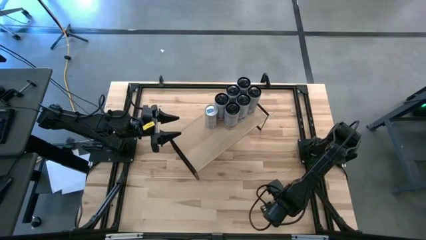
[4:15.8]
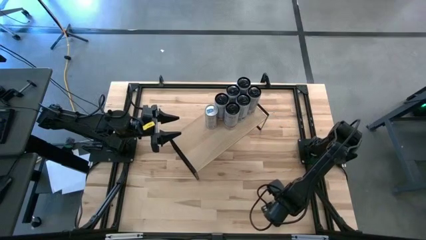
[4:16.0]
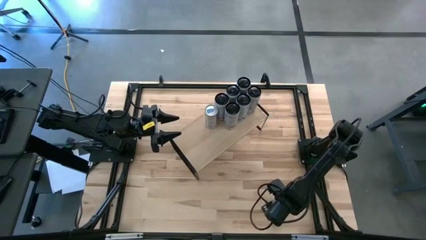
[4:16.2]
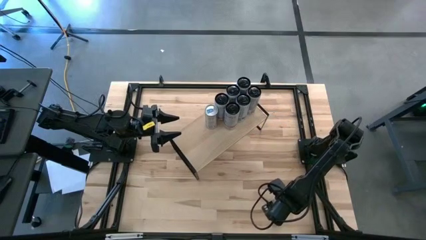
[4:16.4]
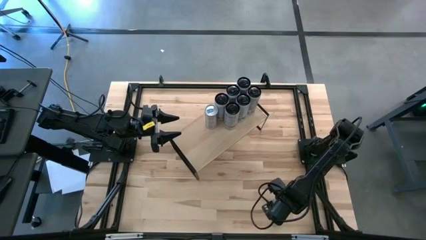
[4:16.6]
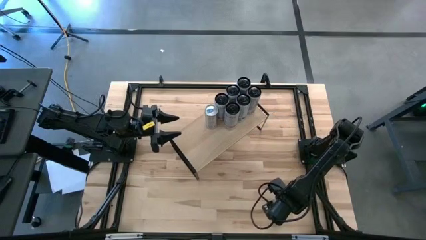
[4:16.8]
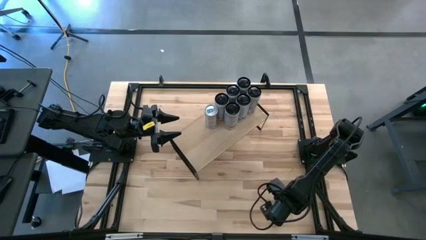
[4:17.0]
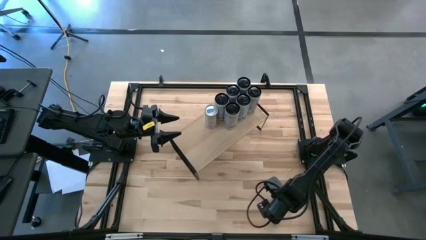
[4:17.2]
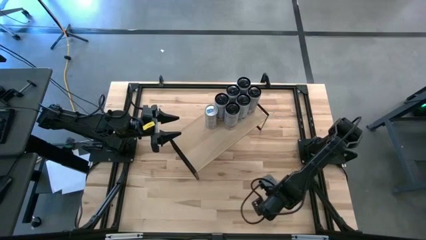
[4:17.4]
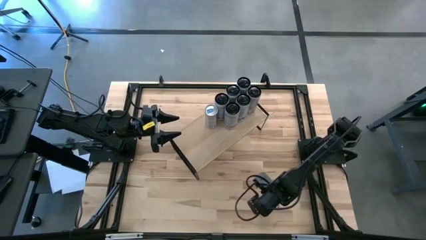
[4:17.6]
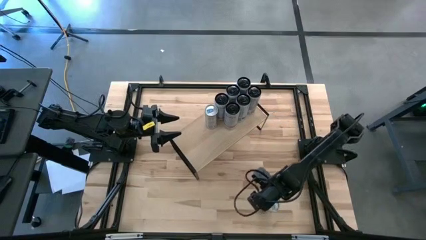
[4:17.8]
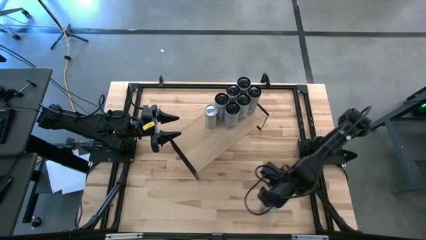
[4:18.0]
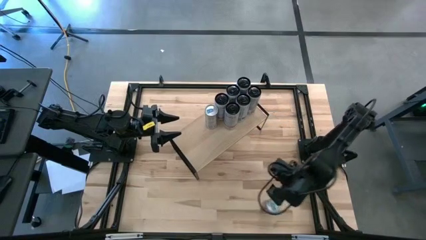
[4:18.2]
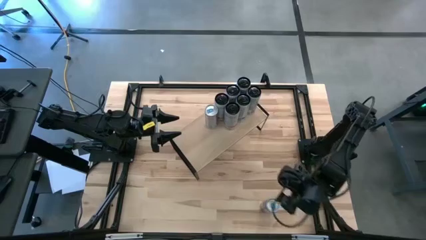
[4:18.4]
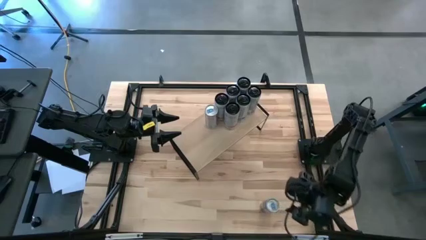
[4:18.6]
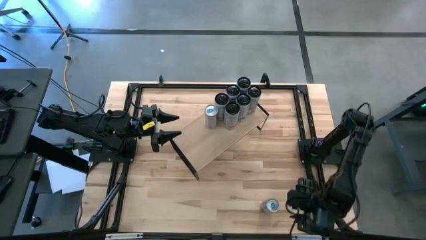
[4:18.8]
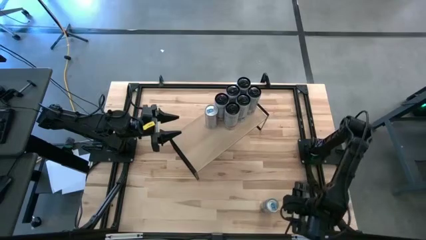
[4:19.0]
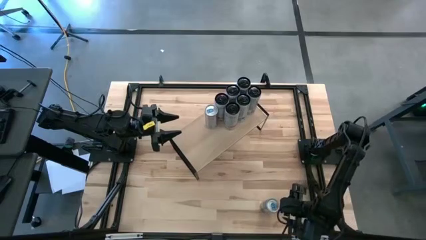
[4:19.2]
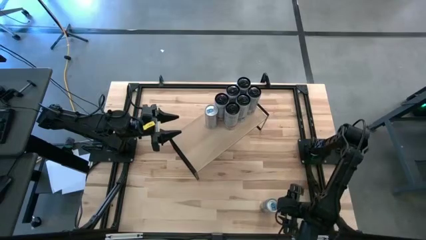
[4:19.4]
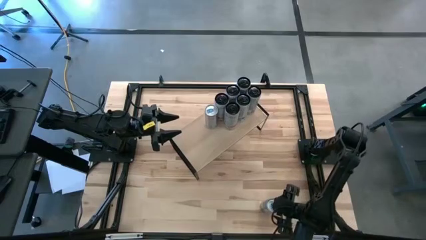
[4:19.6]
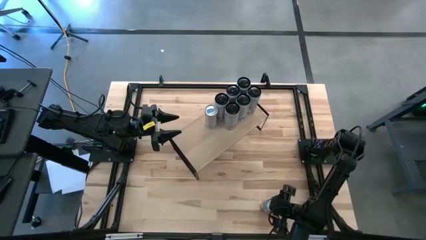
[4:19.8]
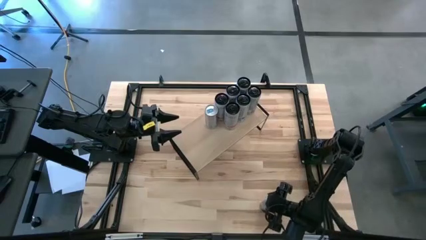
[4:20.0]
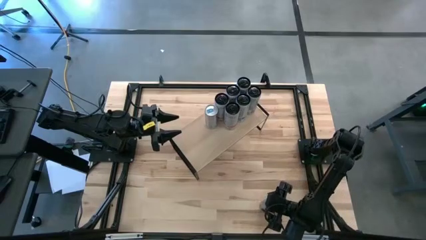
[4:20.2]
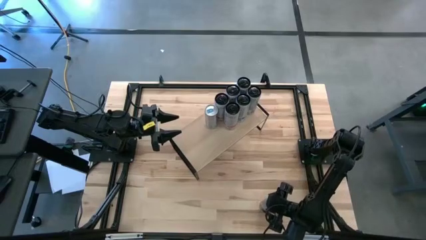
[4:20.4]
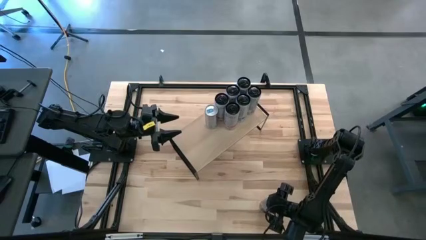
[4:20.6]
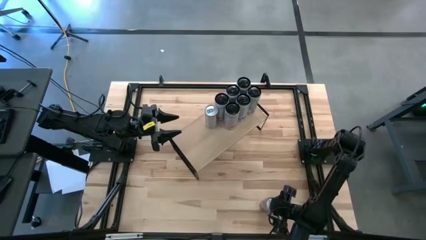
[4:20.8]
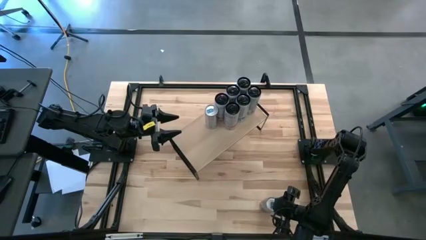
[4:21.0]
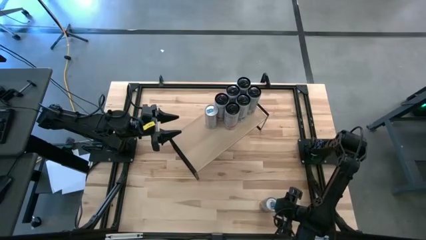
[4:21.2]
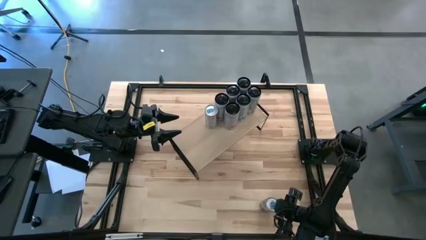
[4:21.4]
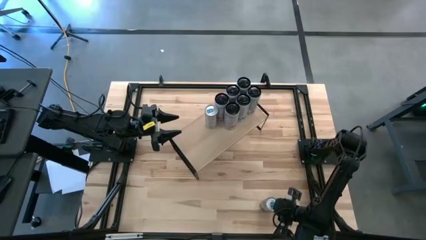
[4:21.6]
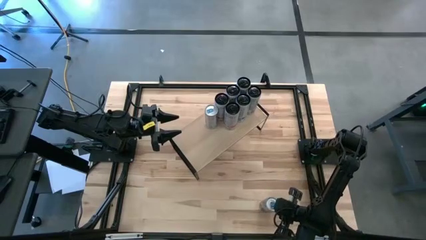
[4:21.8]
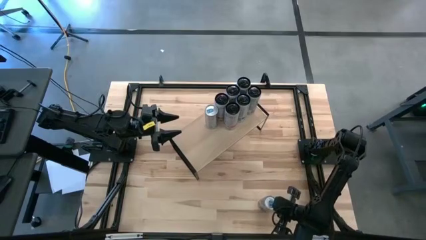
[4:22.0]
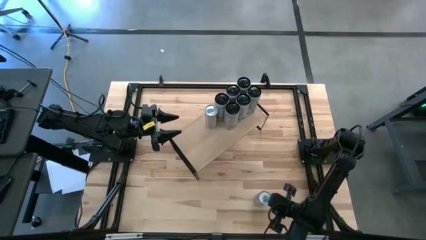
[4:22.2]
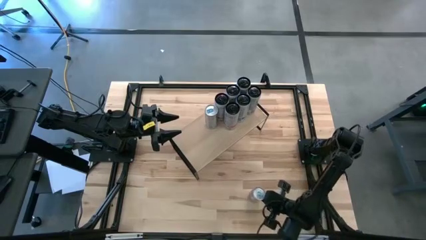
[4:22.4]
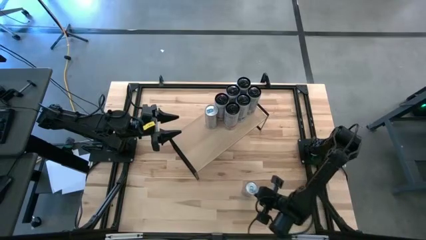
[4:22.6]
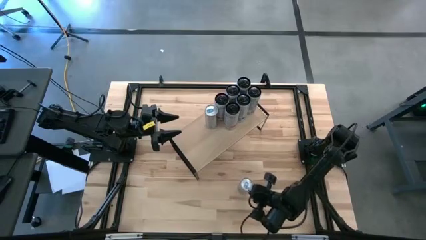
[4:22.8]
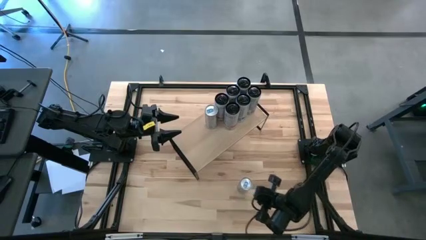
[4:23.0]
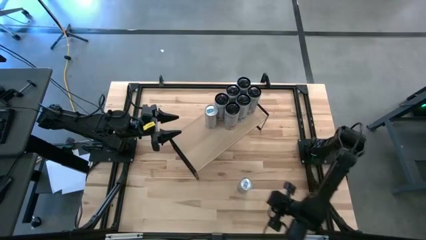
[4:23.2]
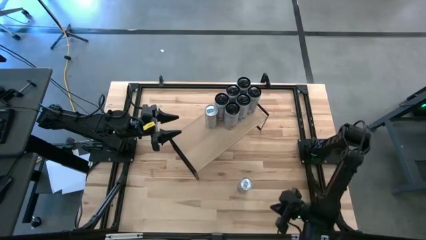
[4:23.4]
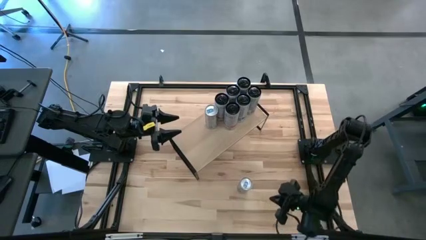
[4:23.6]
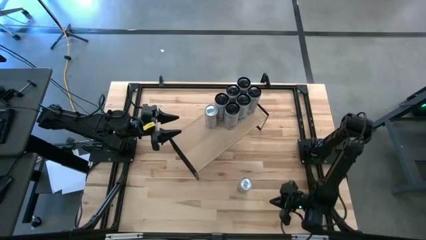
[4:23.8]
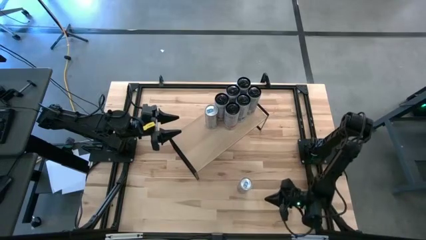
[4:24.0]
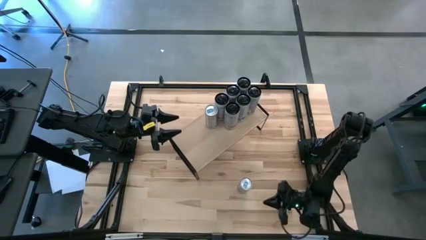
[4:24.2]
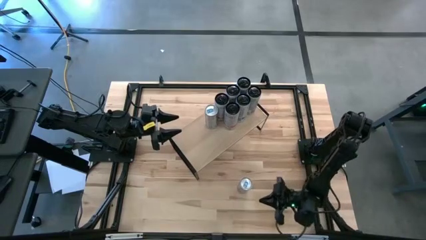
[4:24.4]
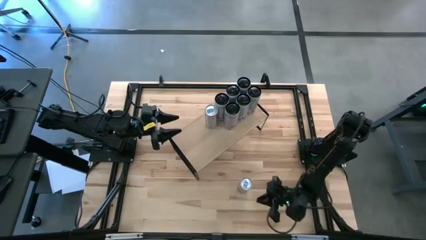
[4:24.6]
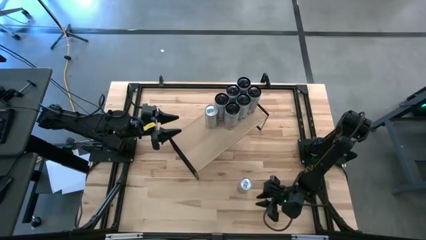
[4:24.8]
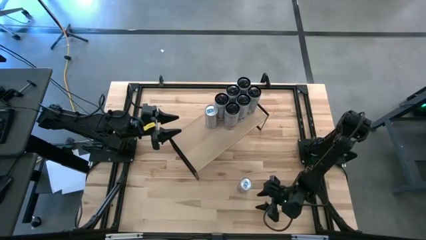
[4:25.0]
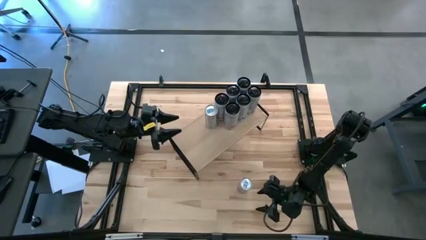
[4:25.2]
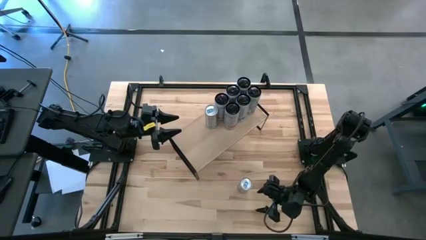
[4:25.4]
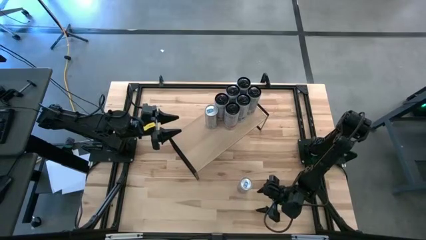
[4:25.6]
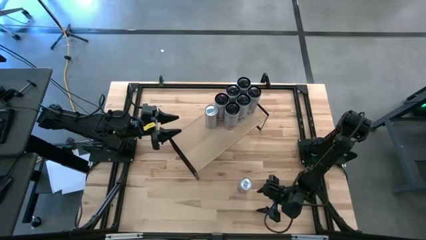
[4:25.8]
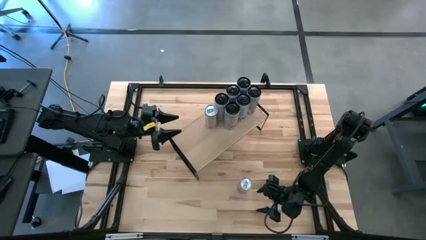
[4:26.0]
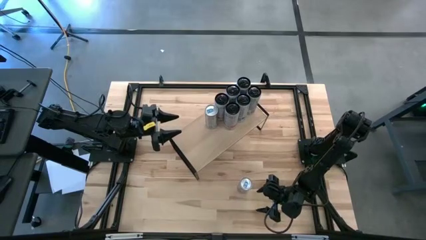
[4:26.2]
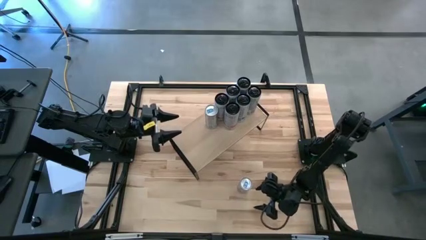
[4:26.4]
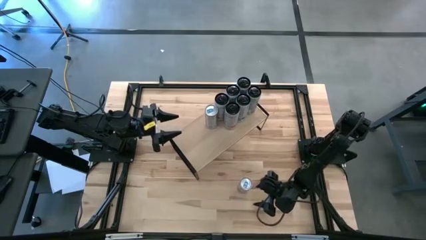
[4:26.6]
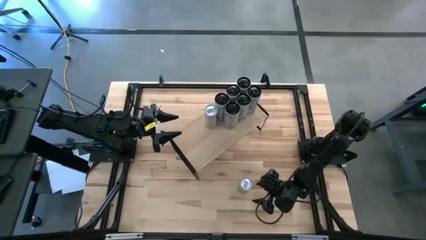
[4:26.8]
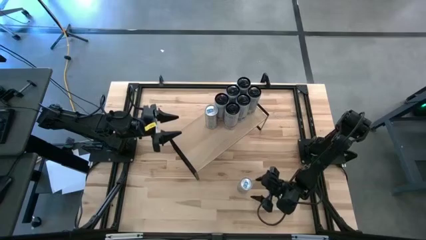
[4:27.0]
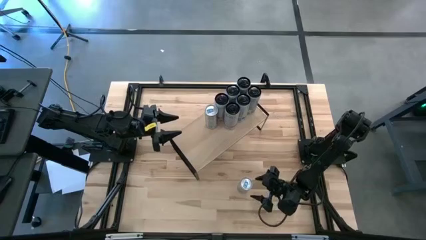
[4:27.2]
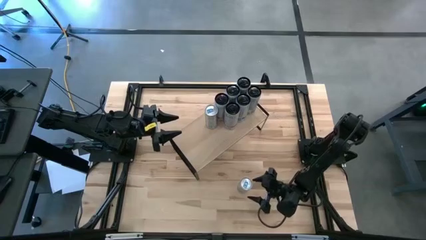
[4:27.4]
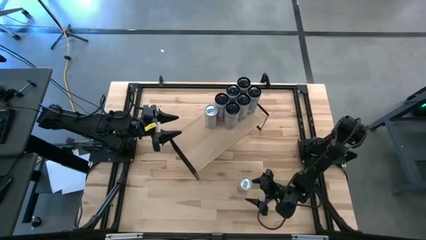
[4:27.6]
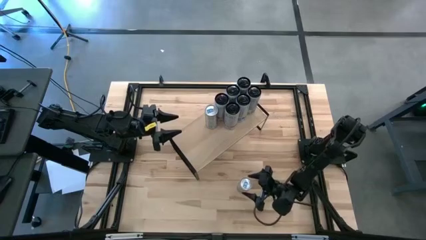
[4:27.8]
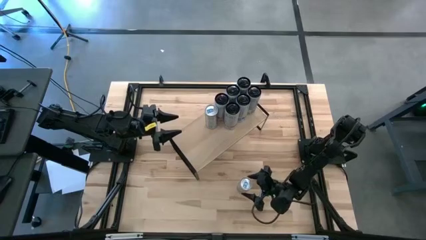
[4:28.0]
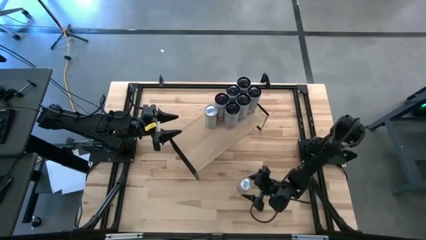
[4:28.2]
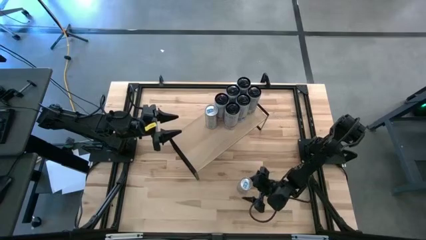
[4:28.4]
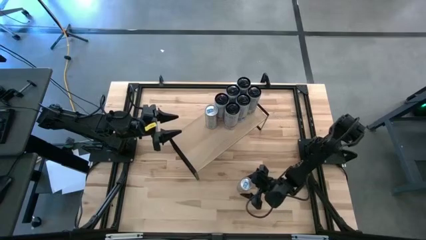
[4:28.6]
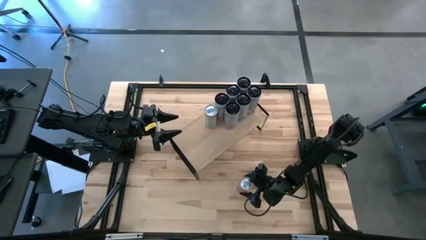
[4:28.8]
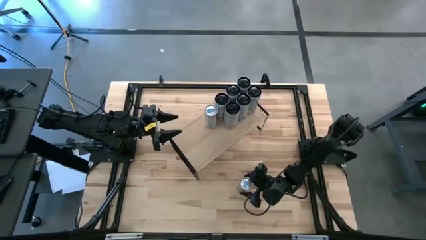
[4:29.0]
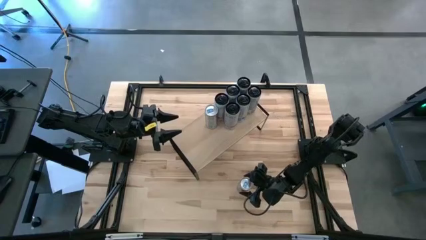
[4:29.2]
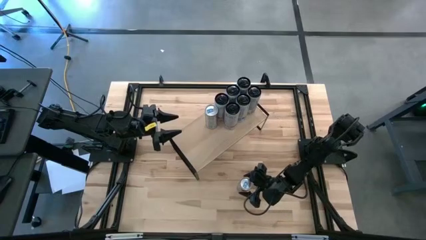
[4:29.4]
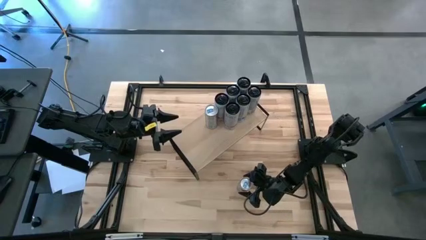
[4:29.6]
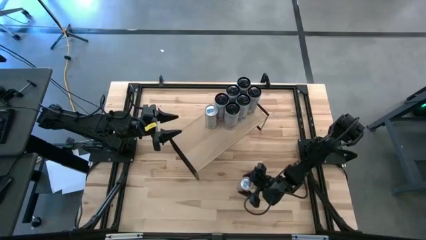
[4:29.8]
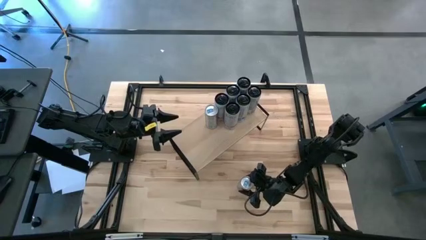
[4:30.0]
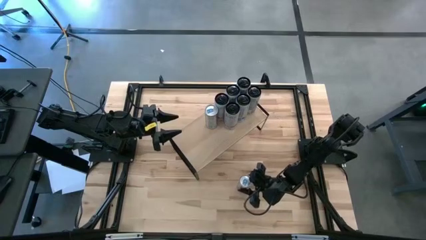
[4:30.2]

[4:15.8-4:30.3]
Task: Place canned beverage on shelf
Put the blue soda can on the shelf and align it with the other blue soda can
